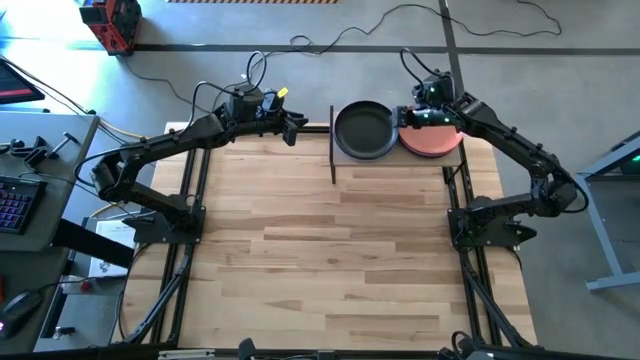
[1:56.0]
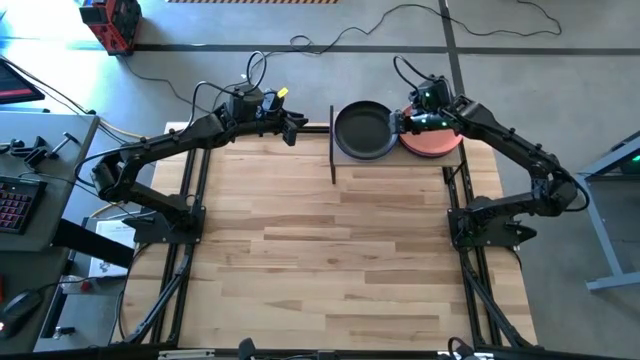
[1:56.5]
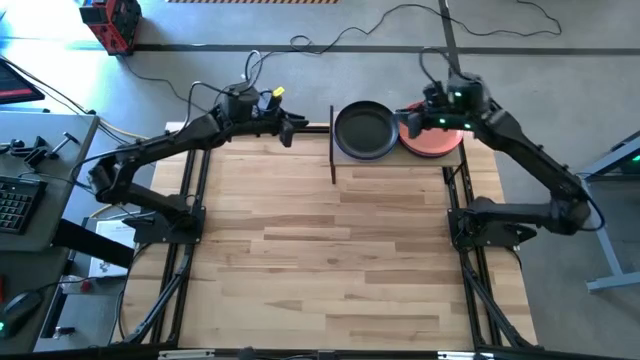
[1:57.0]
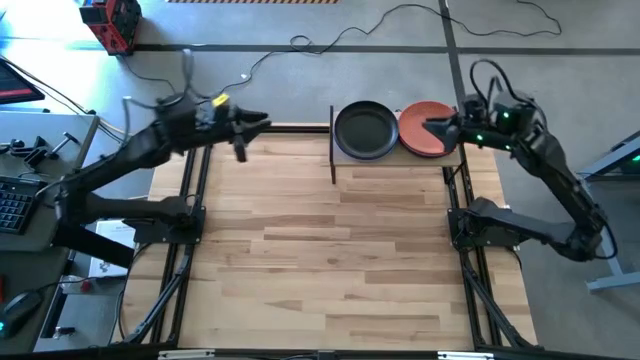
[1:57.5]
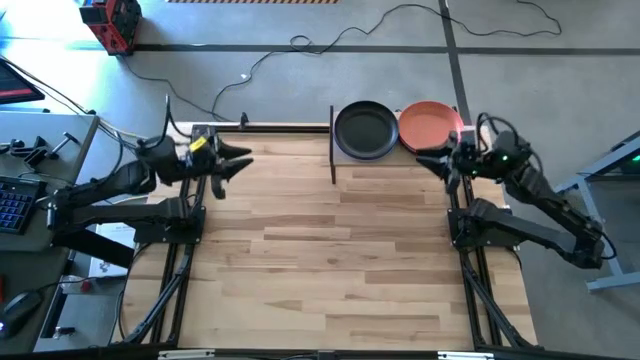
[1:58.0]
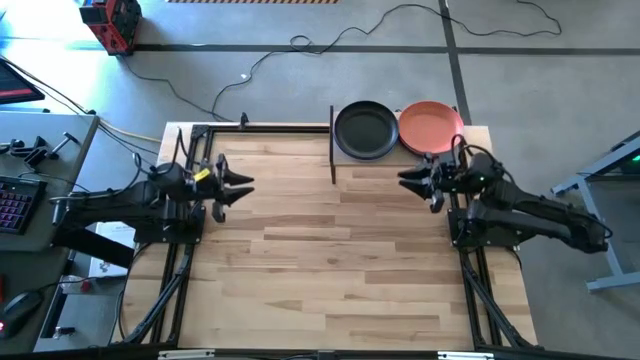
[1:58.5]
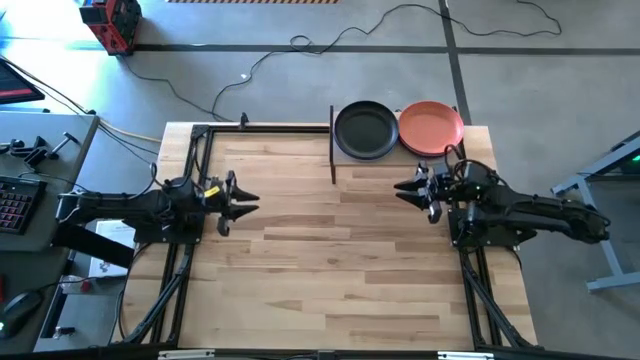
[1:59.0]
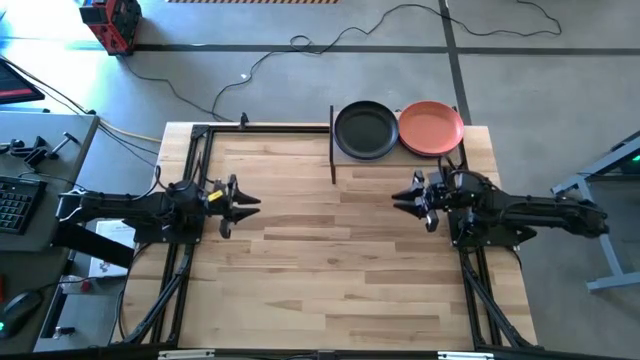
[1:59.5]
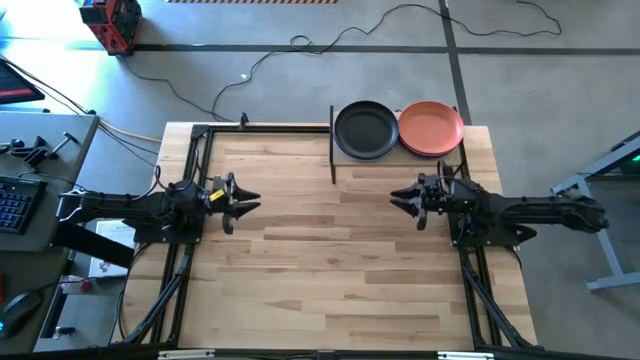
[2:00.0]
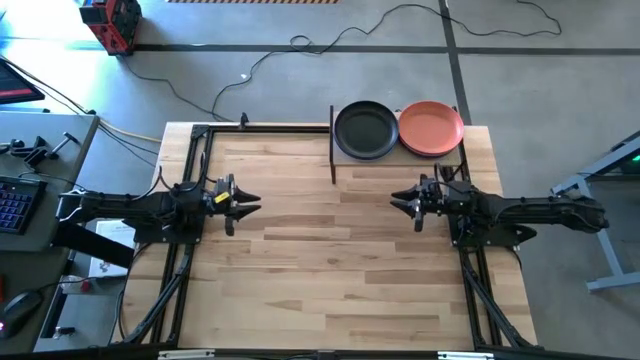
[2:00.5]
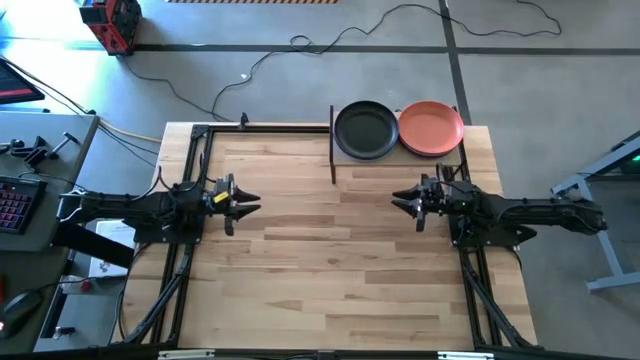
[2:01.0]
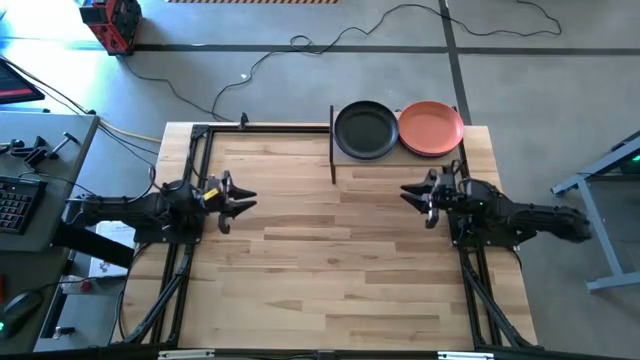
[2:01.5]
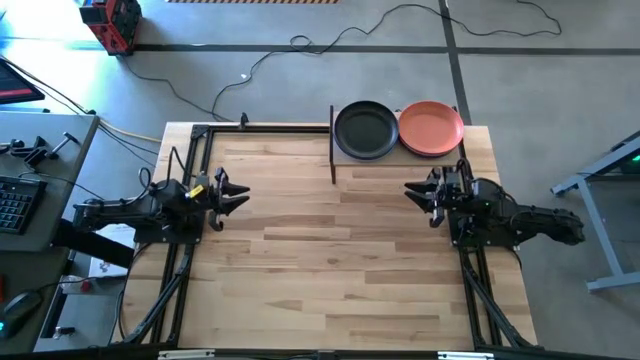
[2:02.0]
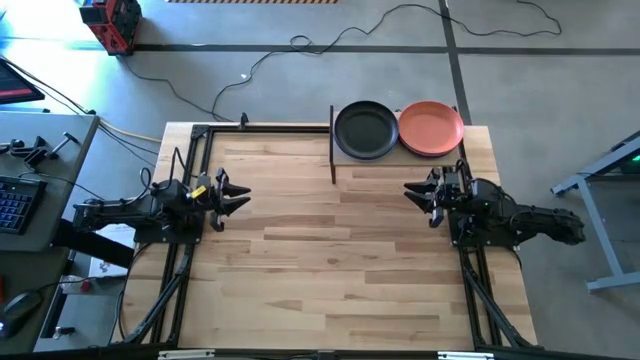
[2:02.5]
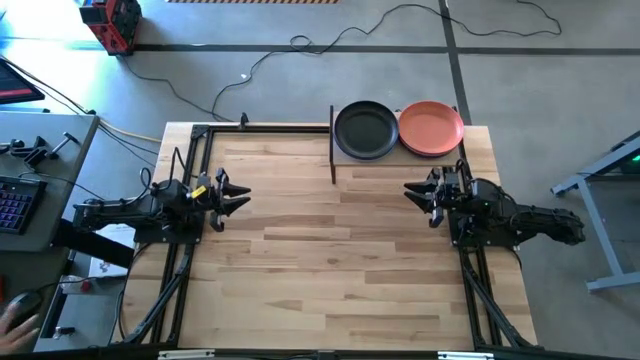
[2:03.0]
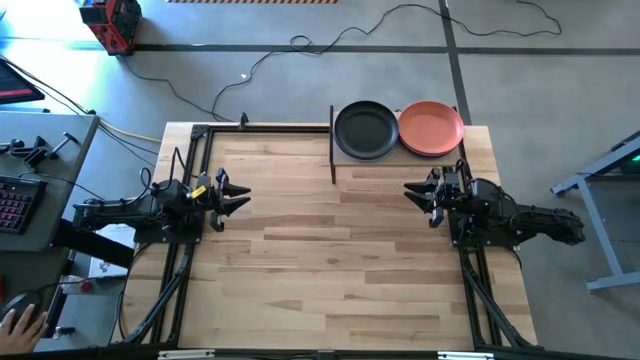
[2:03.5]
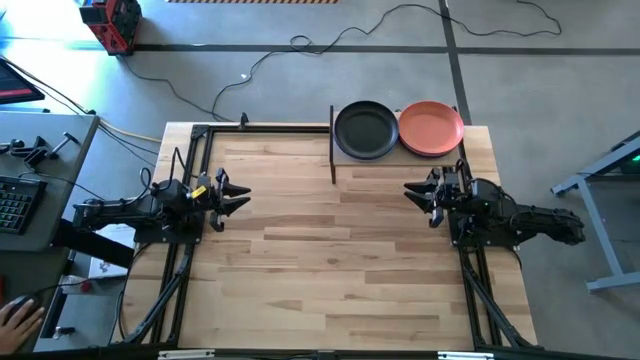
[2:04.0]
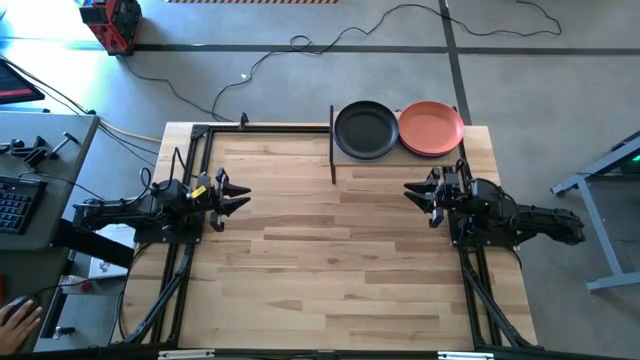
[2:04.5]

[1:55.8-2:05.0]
Task: Place and stack plates onto a shelf
Return to Home Position

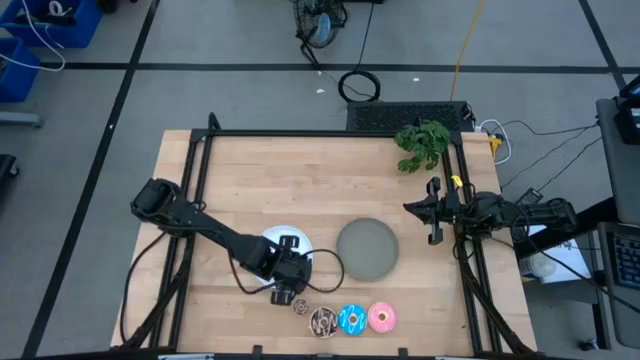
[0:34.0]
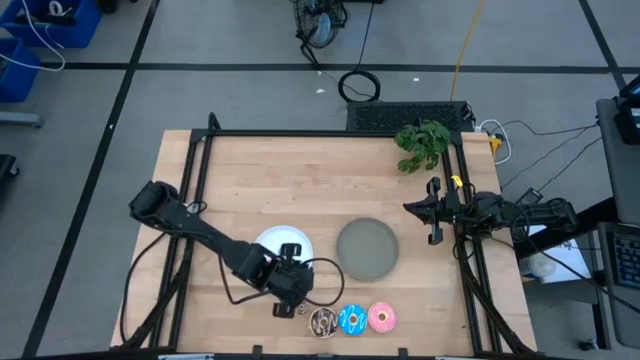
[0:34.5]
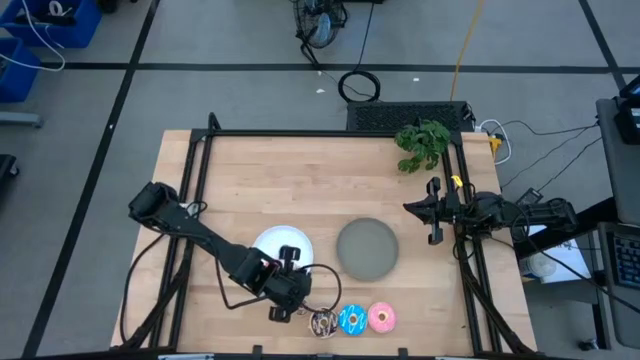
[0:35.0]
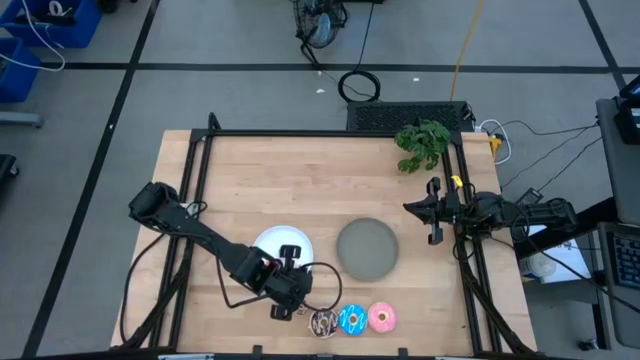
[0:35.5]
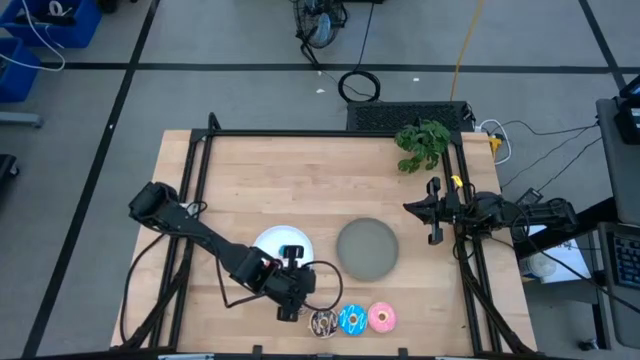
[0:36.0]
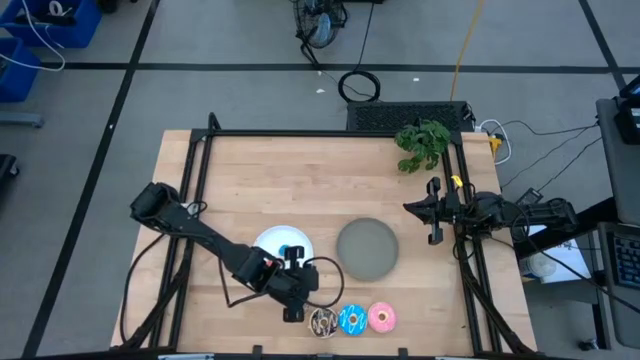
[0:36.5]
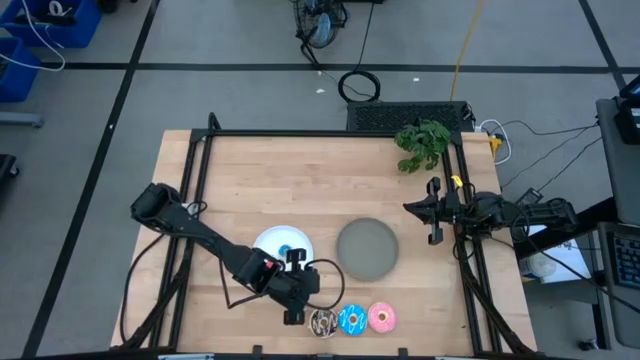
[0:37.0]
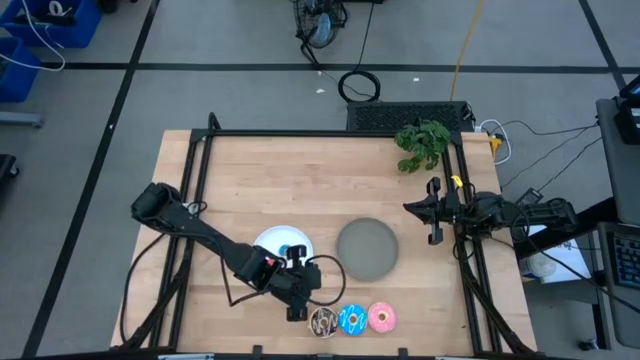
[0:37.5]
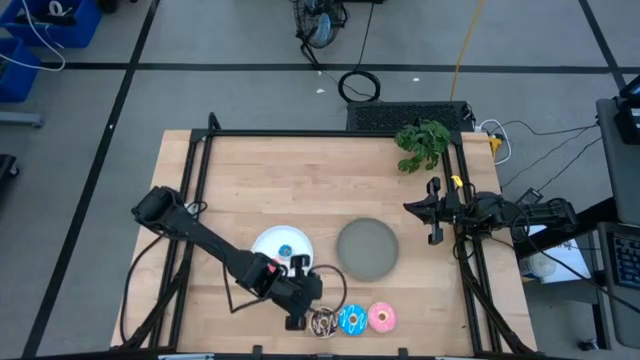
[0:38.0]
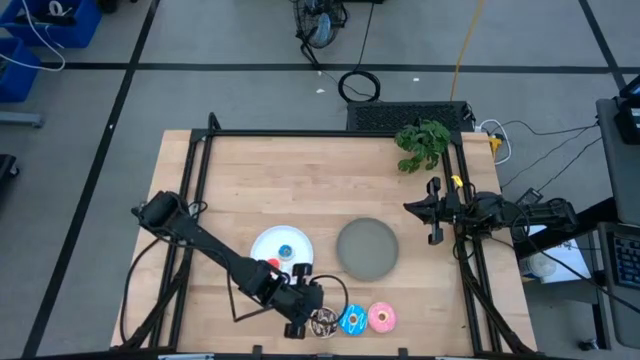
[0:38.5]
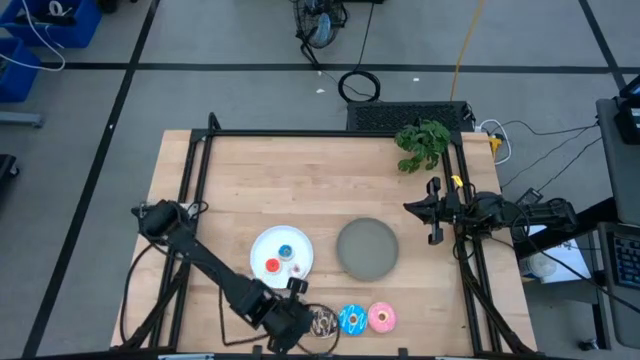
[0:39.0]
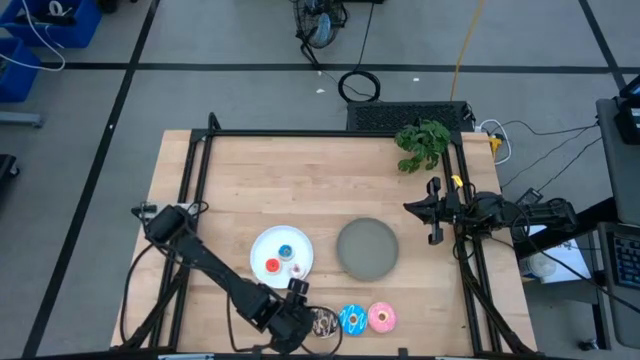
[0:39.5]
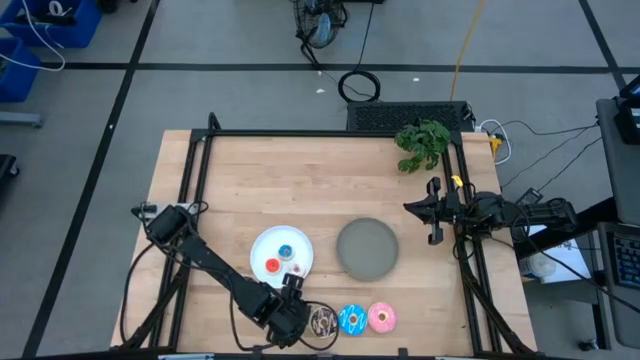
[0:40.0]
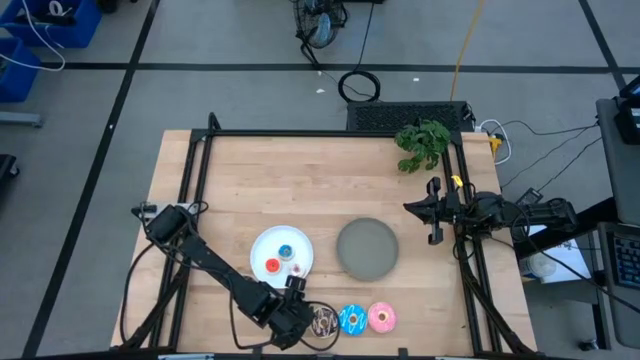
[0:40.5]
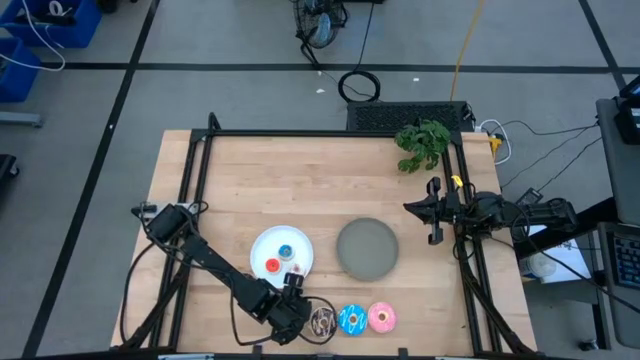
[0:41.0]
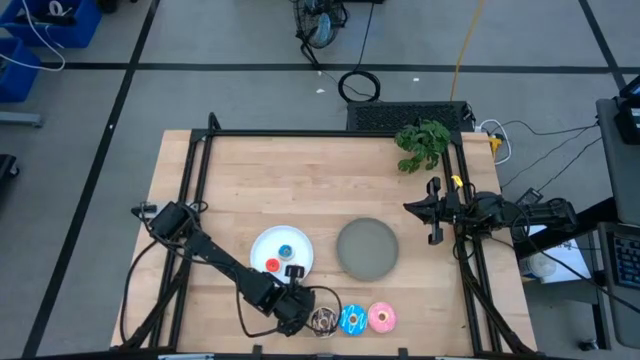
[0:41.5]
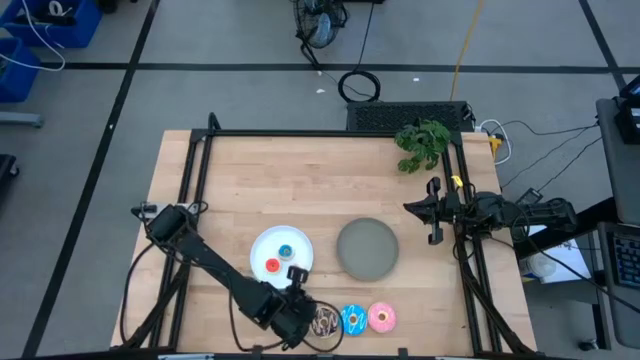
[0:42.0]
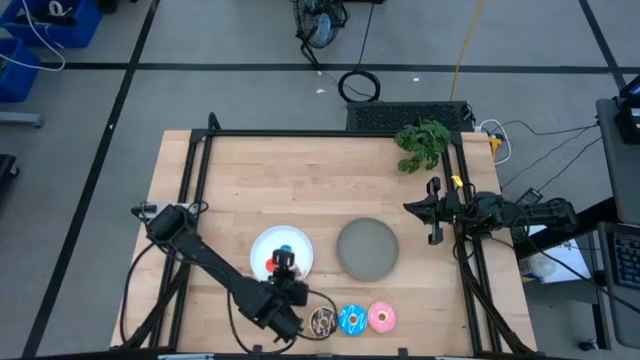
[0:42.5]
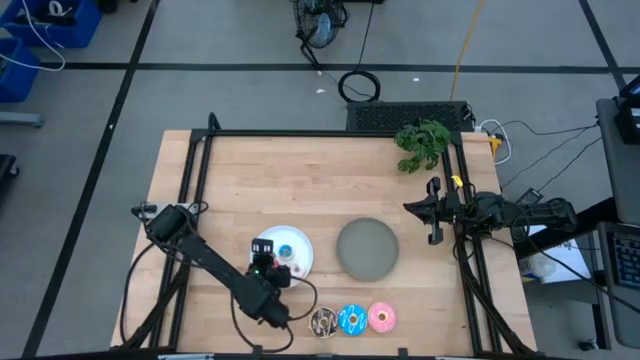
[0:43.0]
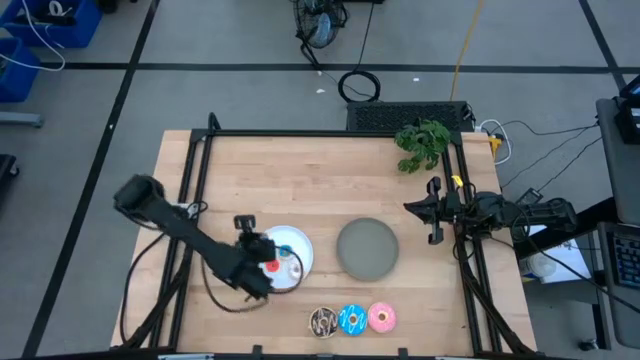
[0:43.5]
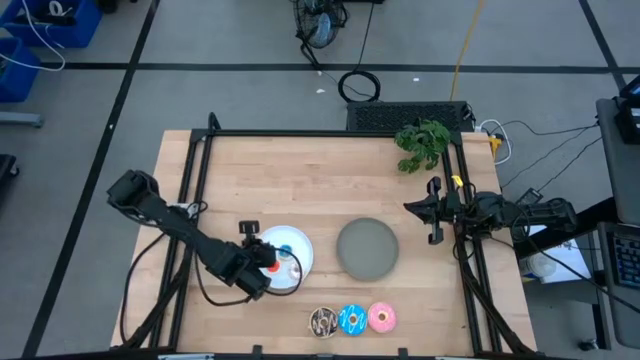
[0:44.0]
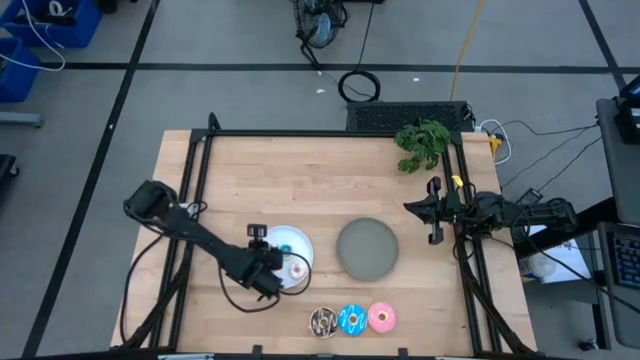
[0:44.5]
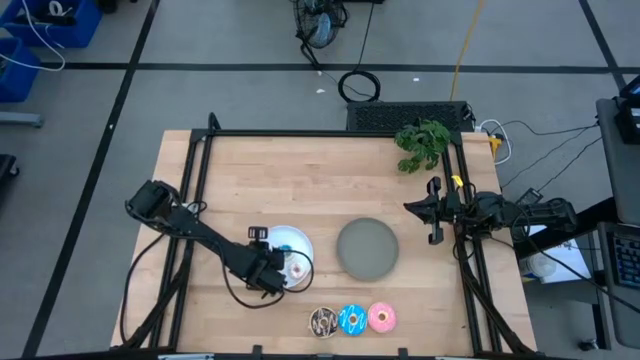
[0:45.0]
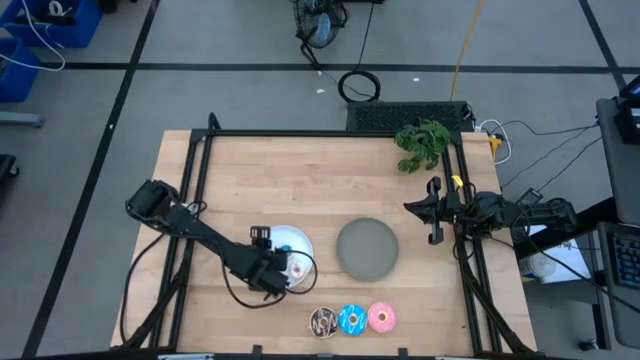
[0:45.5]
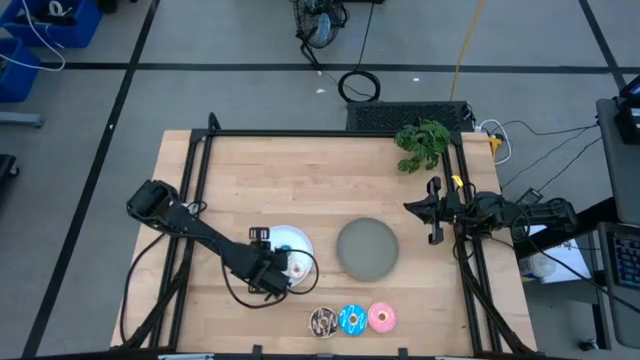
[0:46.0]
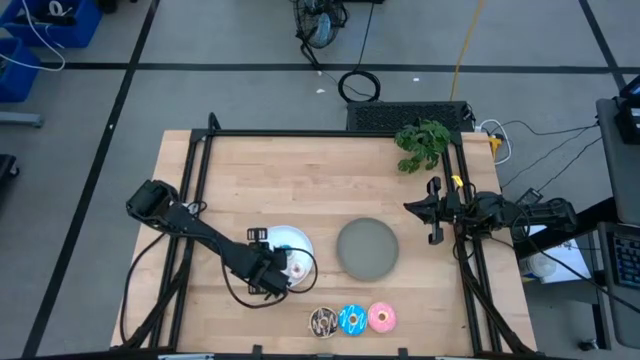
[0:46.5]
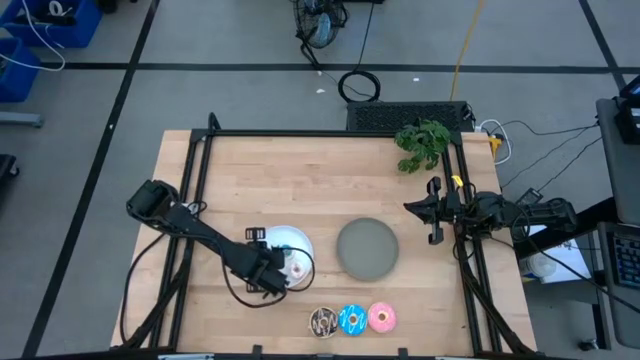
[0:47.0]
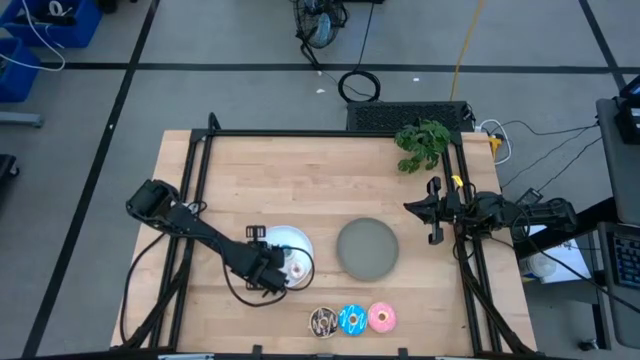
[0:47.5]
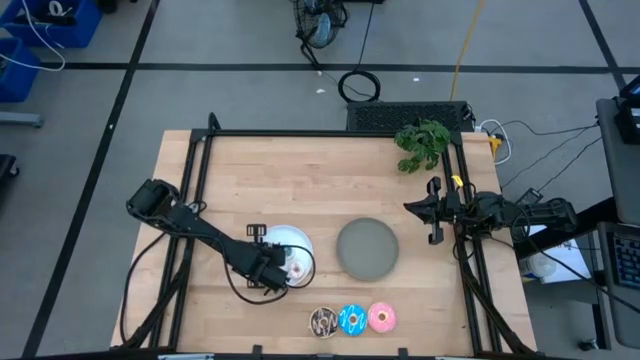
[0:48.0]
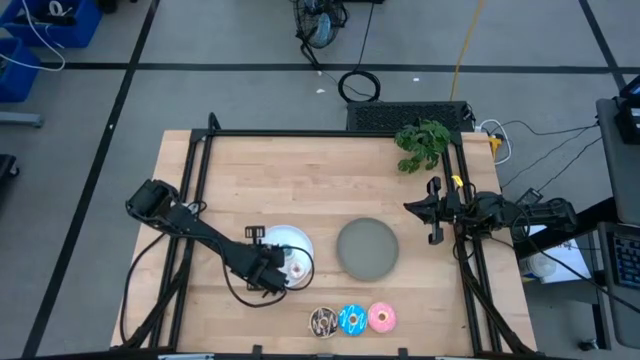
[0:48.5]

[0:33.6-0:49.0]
Task: Pick & Place donuts
Put the small brown donut on the white plate
